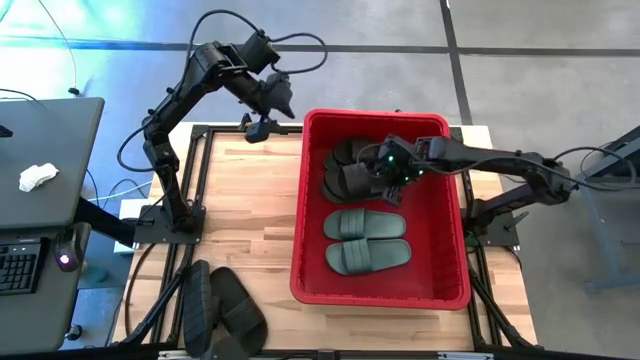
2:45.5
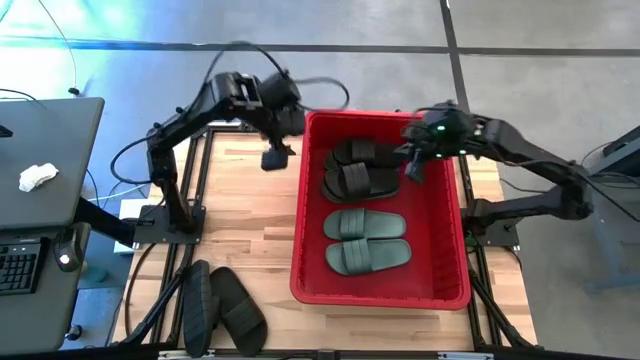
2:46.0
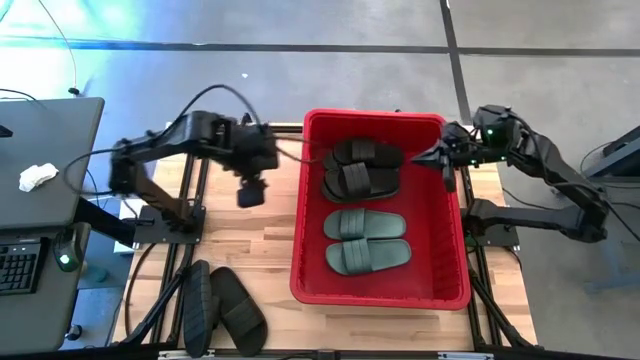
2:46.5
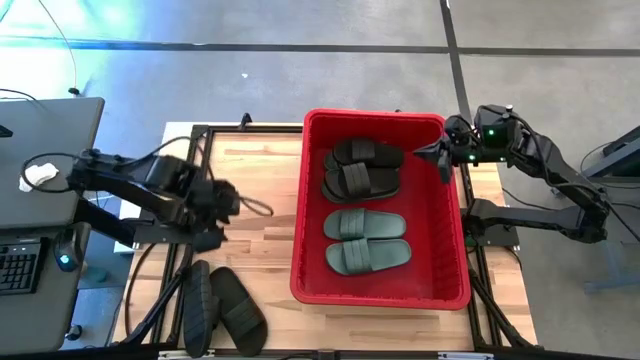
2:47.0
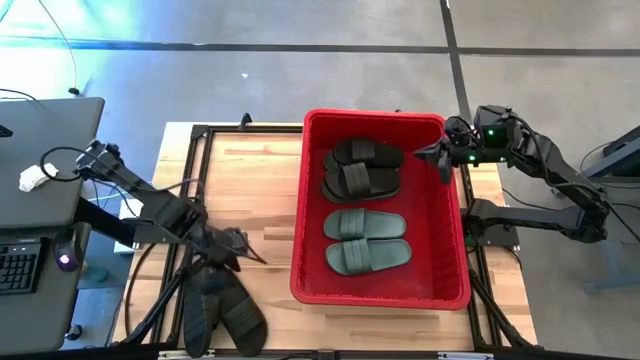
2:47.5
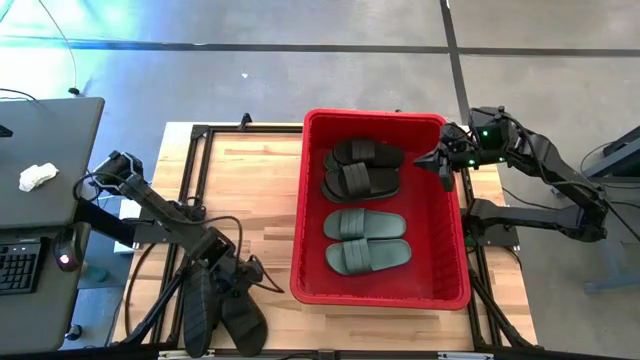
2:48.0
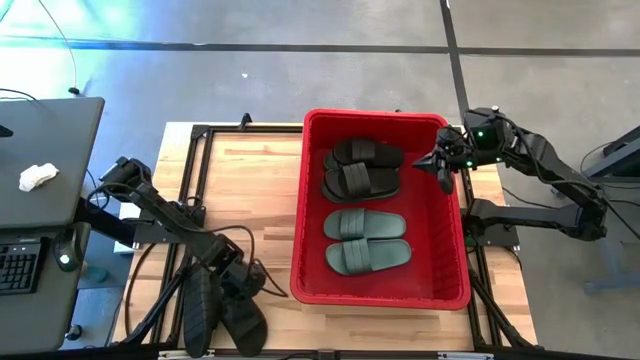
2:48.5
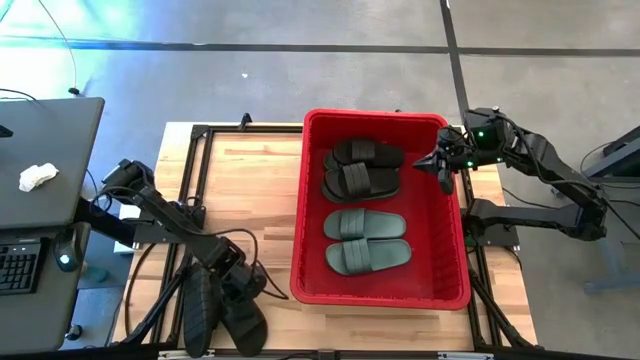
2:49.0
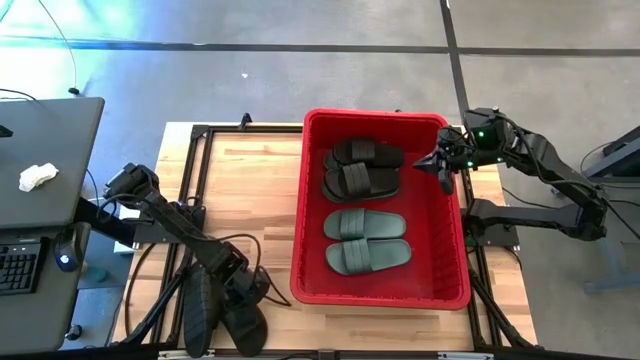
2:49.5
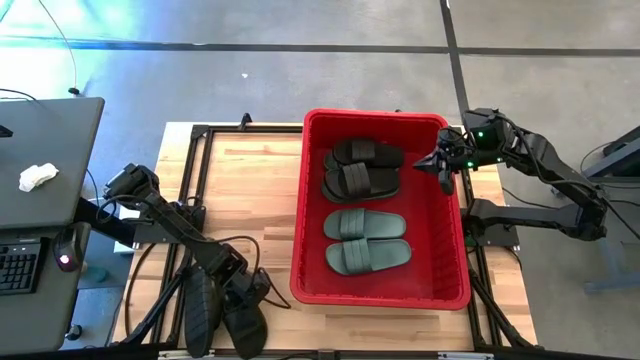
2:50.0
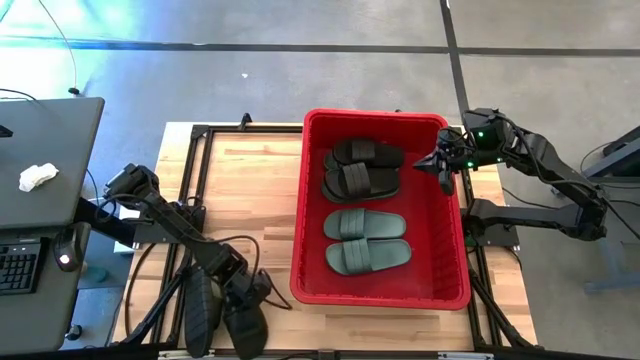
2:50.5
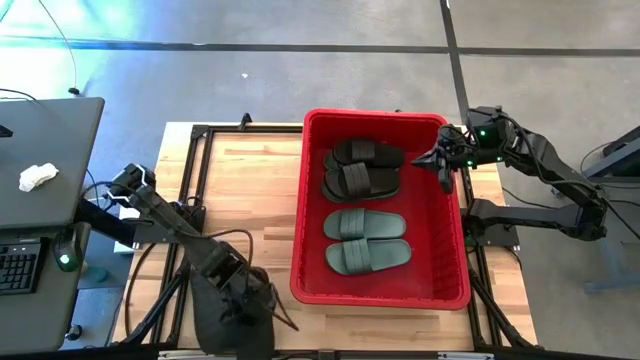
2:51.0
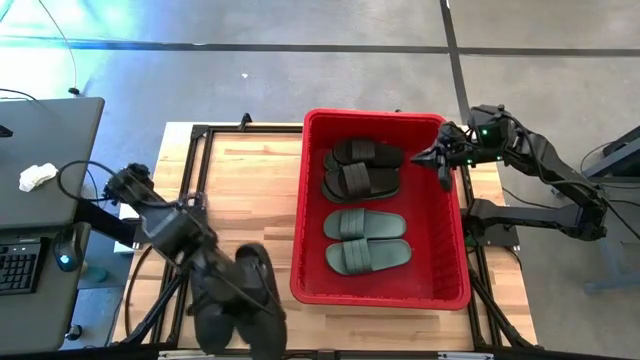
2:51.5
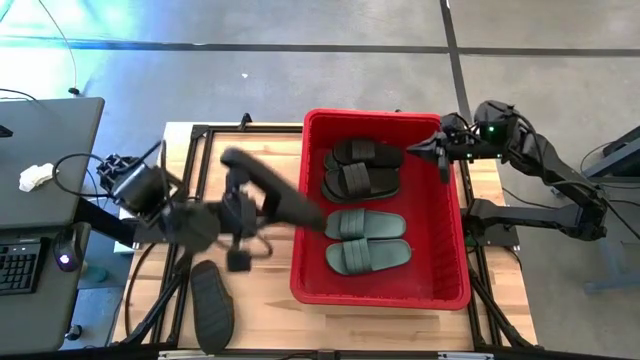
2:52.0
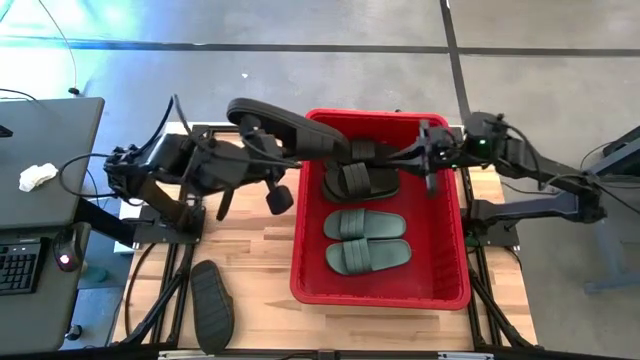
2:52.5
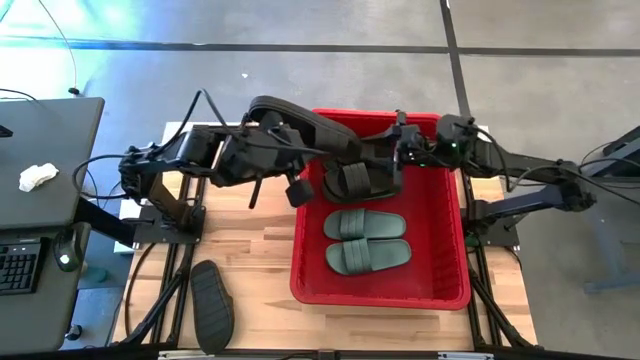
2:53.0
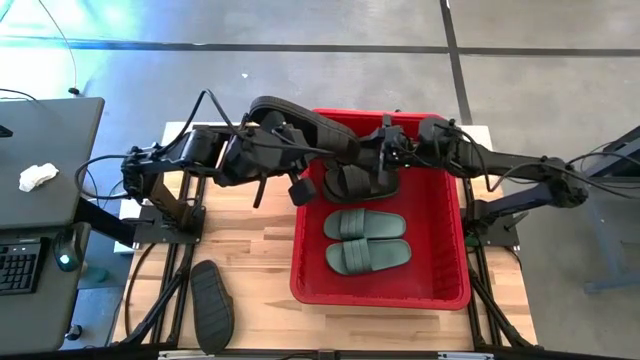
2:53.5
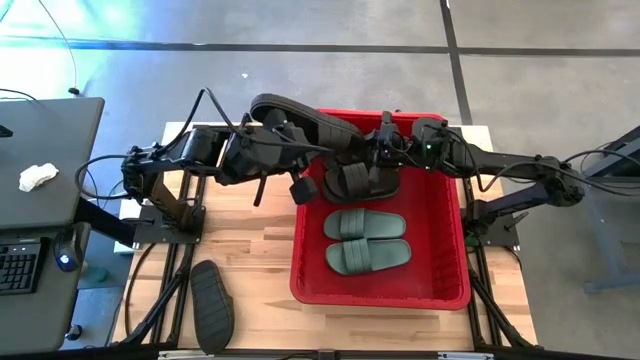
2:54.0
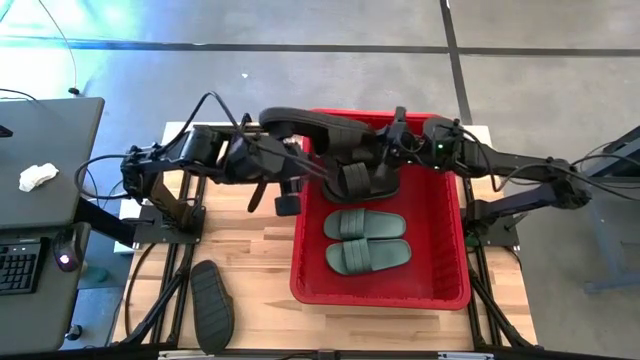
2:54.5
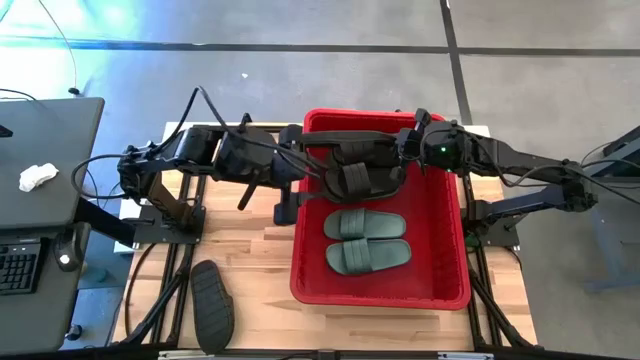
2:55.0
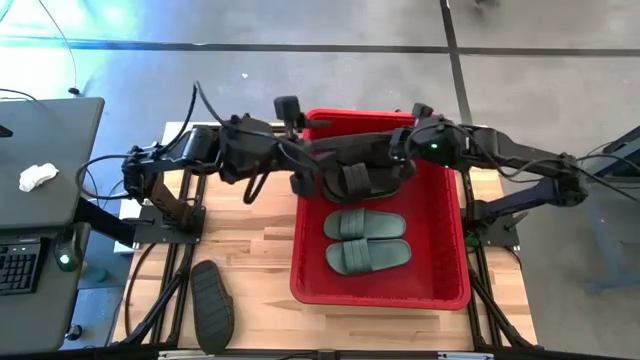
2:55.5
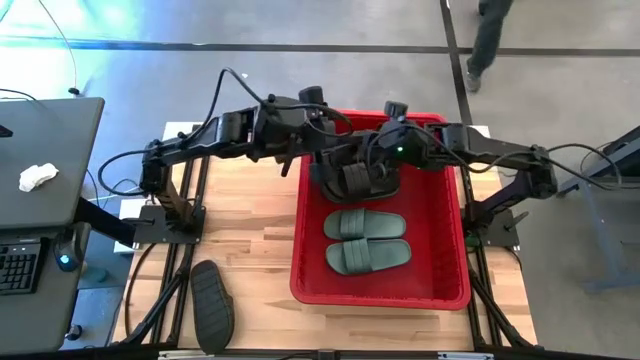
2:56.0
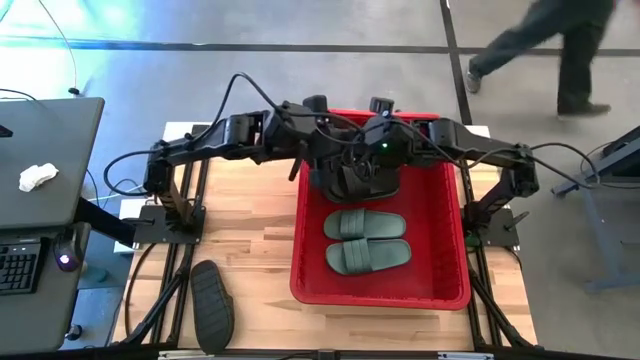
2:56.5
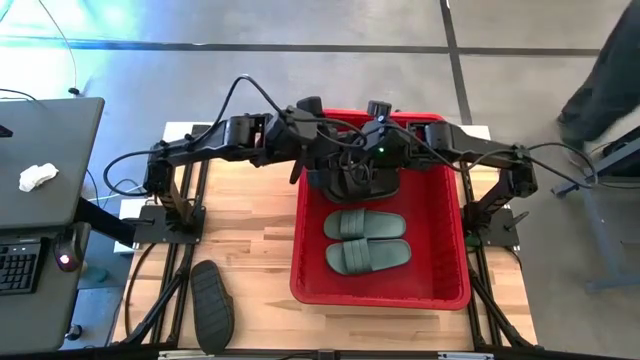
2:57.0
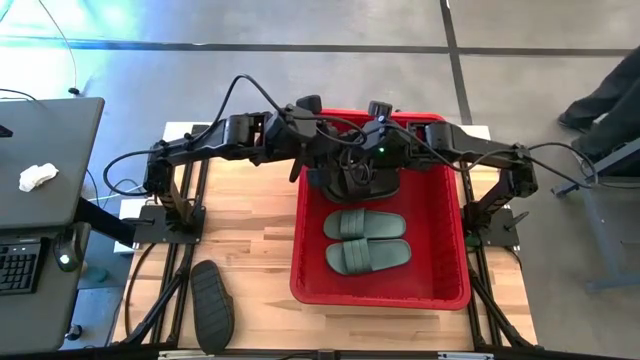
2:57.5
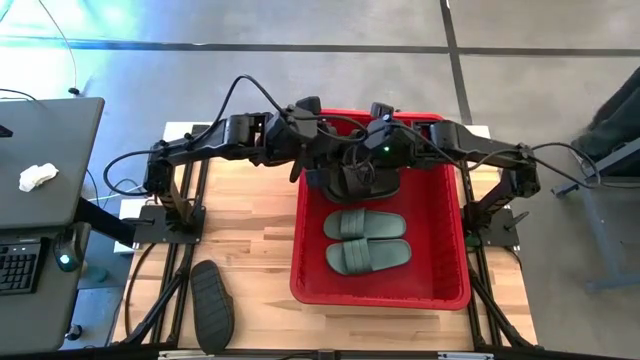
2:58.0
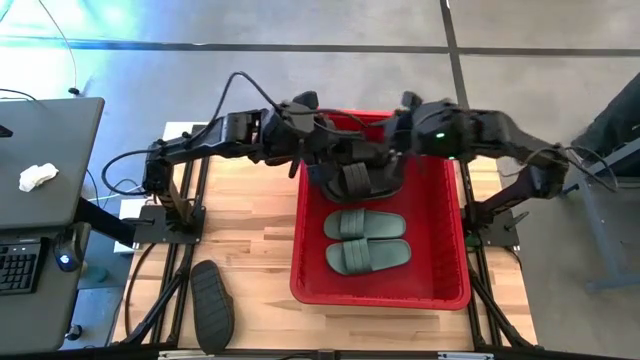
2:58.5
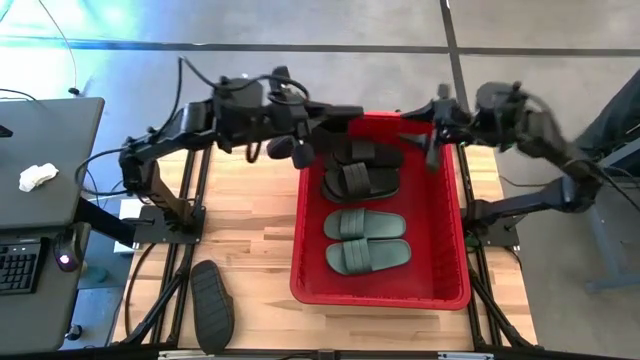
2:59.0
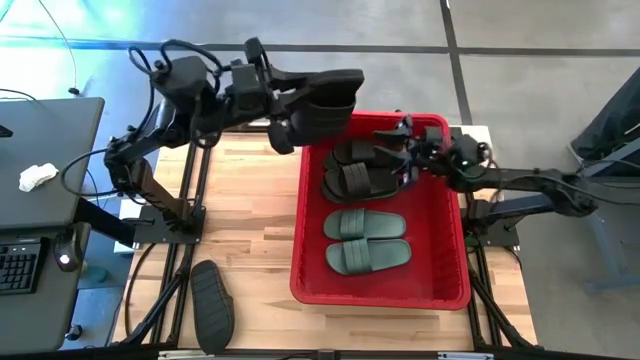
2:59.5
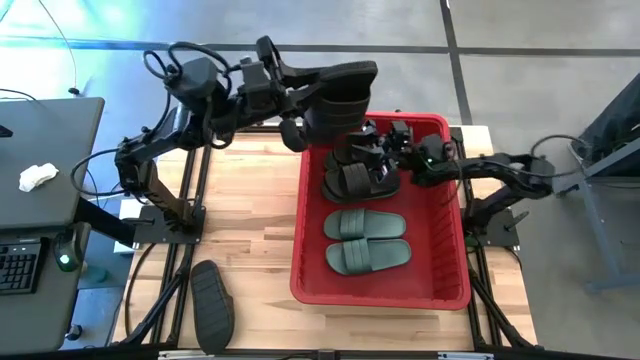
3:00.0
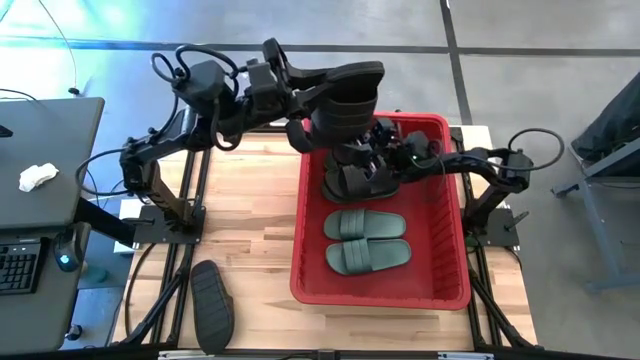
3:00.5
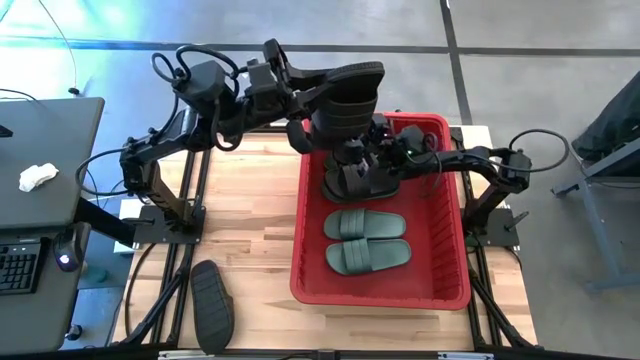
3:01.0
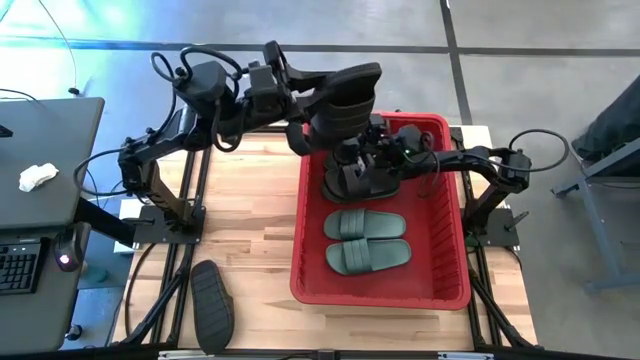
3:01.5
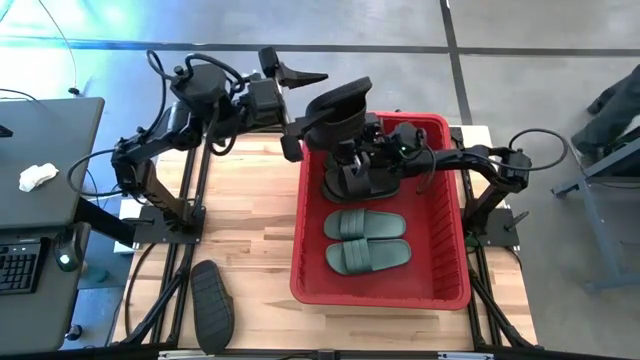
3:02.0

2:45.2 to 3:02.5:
Task: Pick and place slides into bin
Put the black slide into the red container

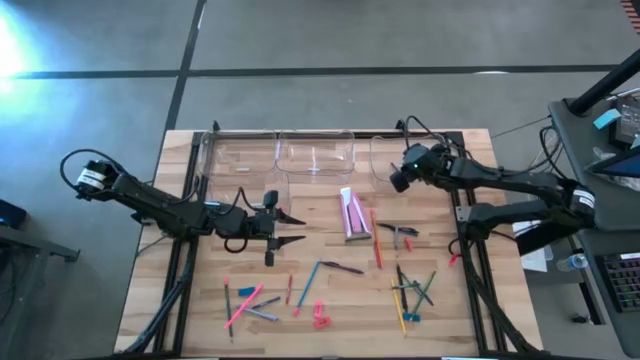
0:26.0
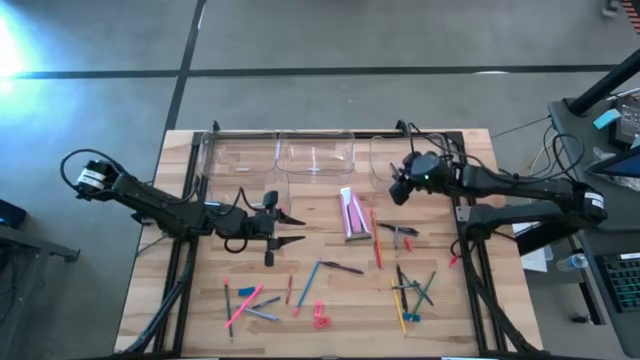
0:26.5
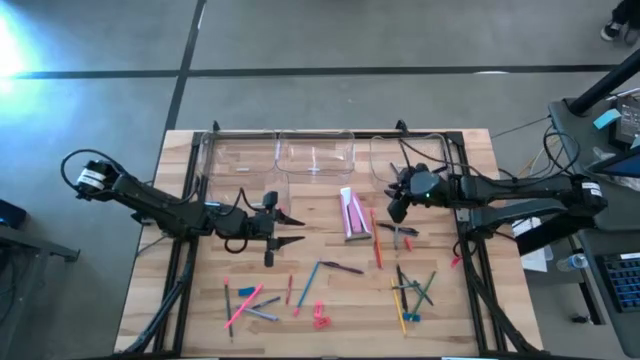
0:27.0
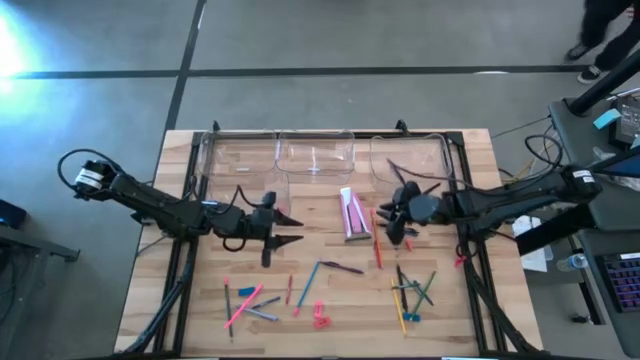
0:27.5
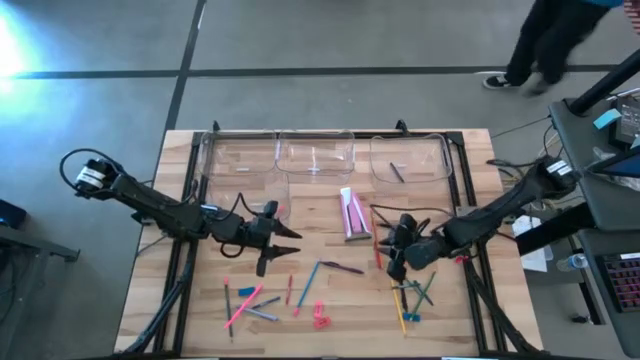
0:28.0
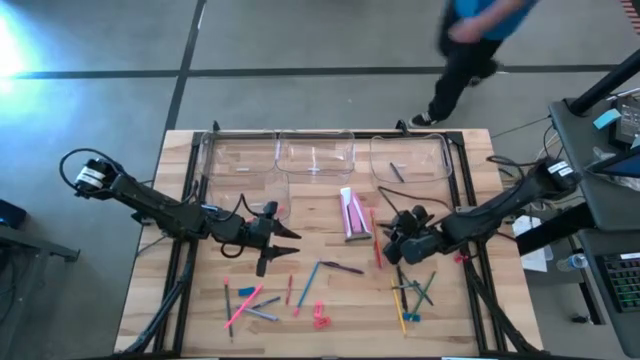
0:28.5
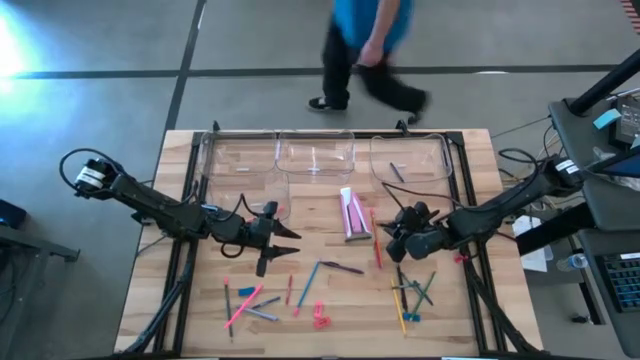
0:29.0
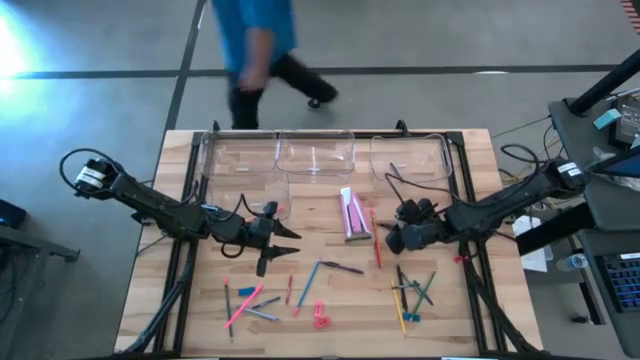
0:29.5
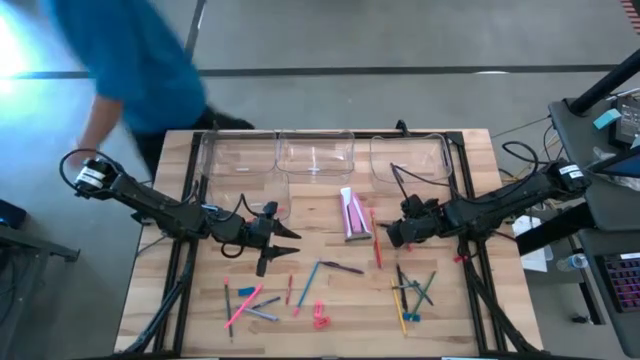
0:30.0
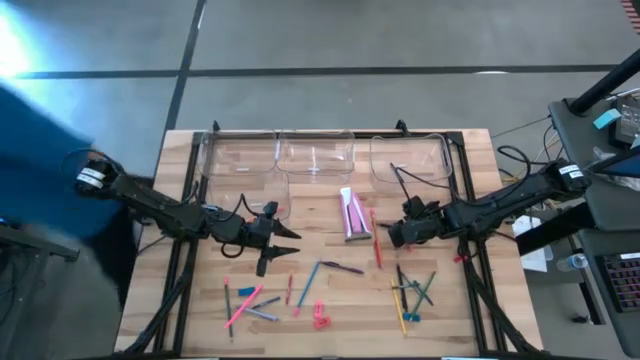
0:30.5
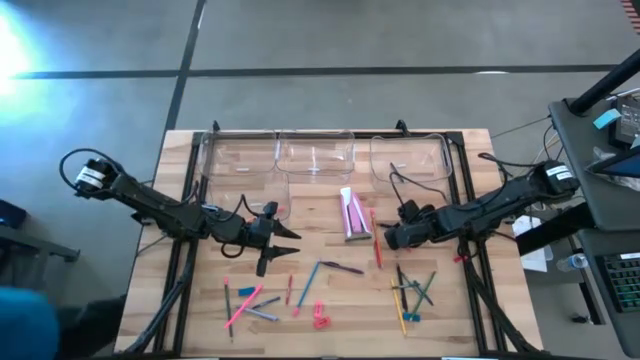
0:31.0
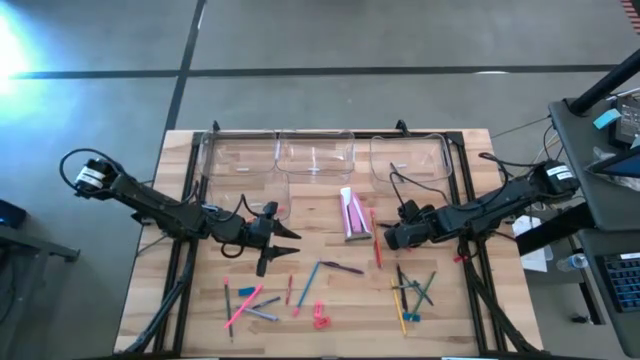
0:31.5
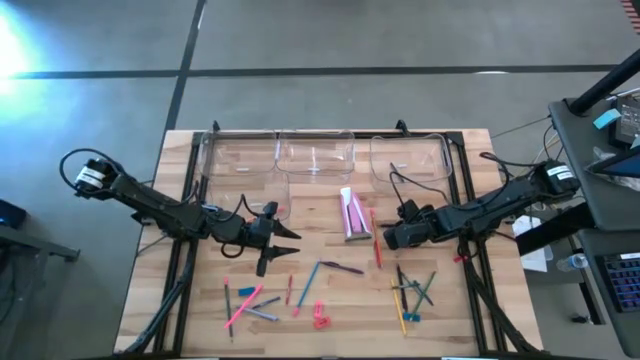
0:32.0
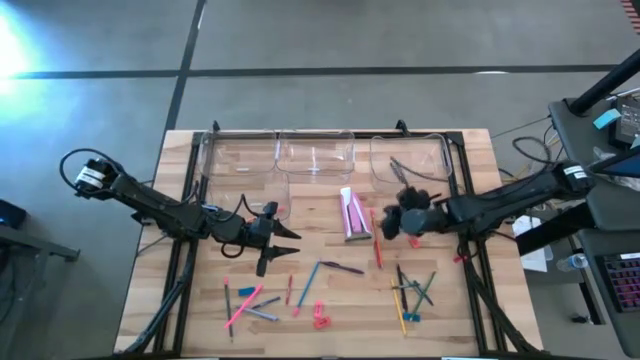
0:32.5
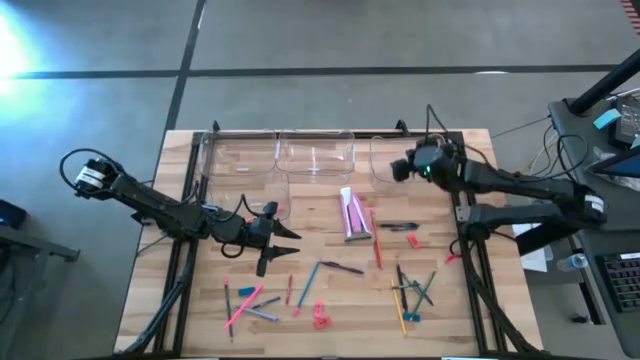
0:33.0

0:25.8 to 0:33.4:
Task: Sort crayons/erasers/pens/pencils in bins
Put the gray crayon into the top right transparent bin
